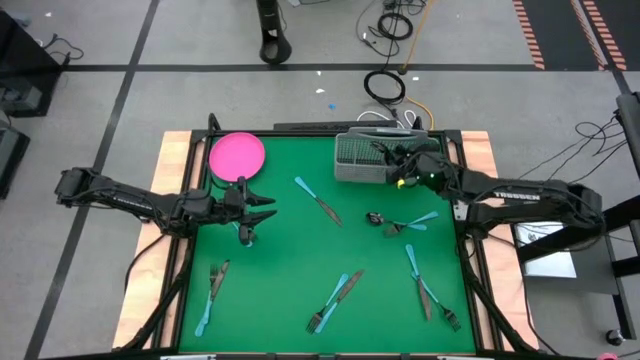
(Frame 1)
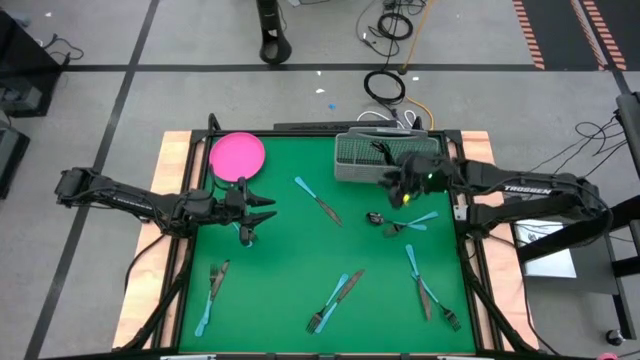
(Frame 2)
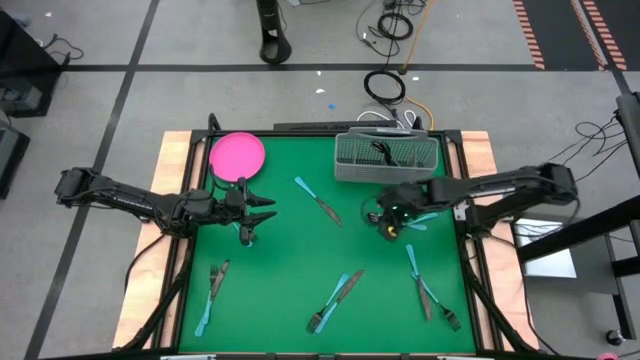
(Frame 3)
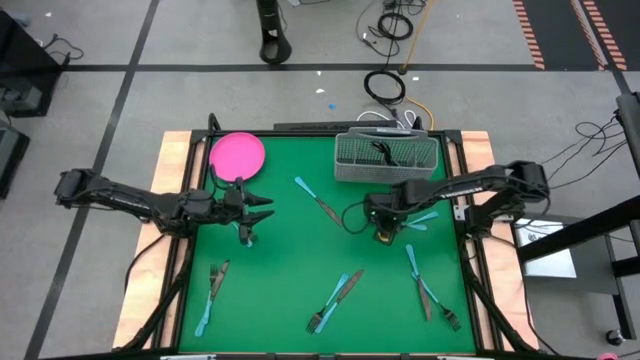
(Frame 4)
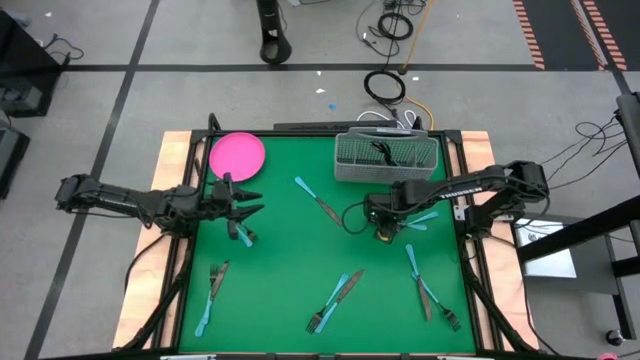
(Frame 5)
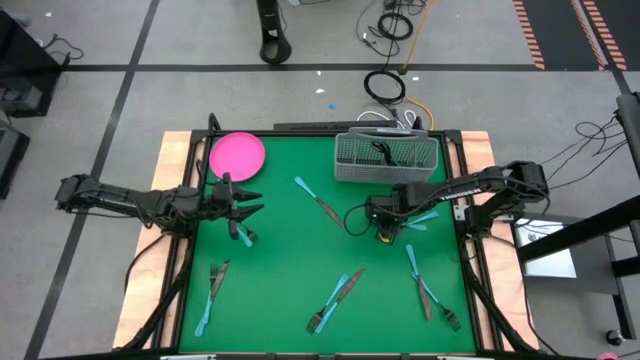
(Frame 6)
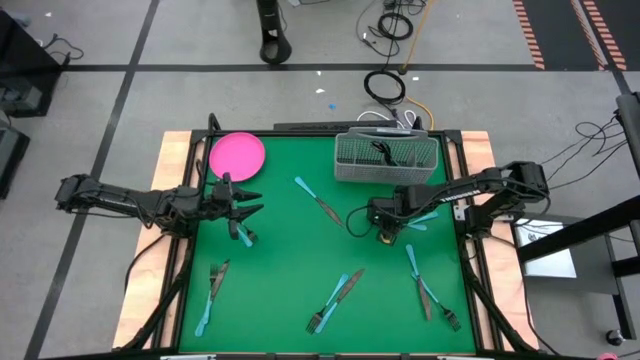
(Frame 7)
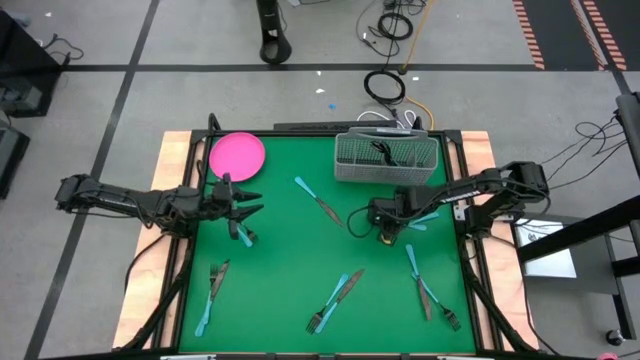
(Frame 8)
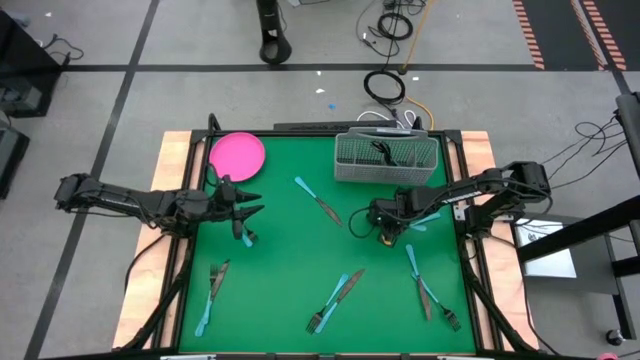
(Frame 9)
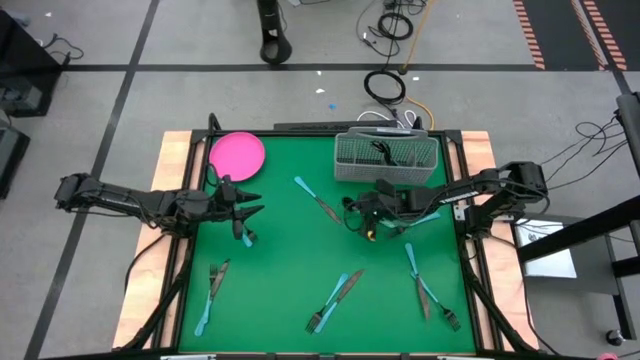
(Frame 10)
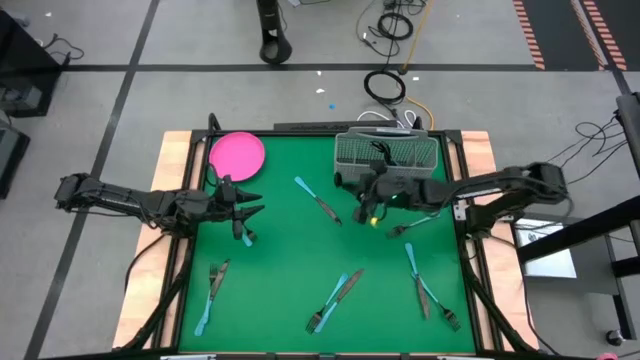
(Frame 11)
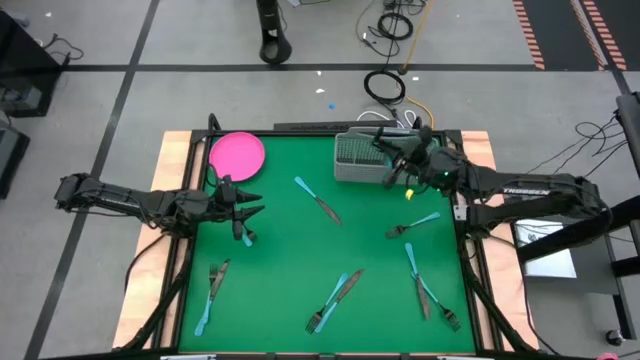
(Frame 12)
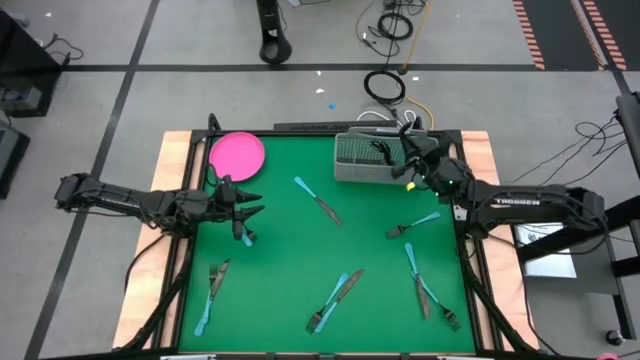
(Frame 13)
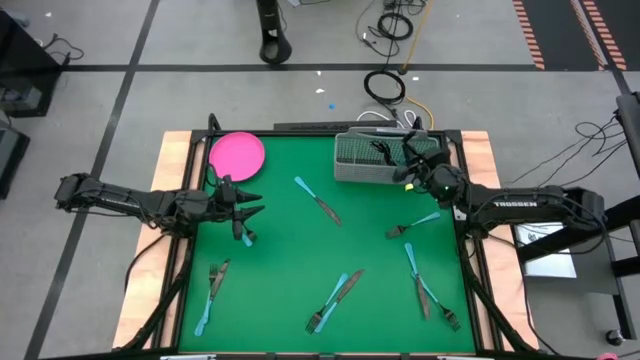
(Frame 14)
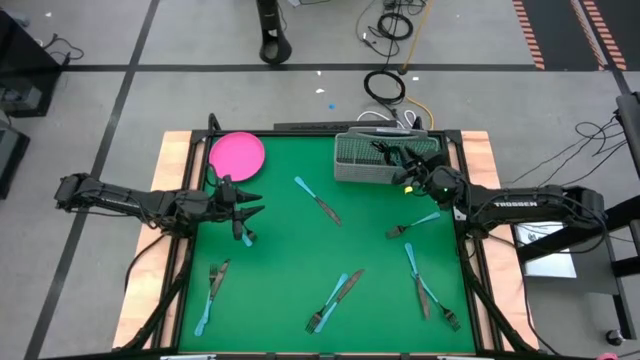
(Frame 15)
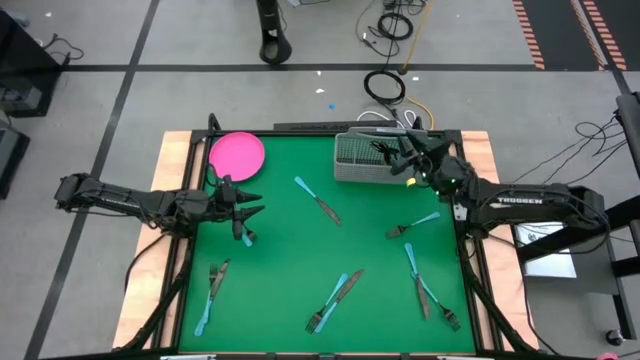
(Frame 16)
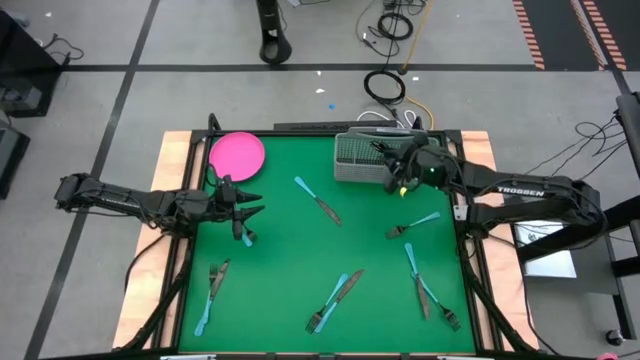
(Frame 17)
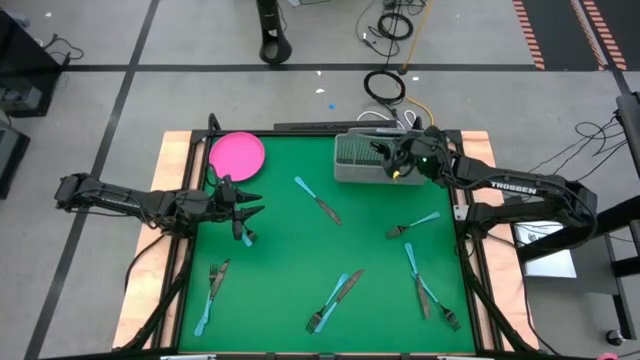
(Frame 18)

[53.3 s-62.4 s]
Task: Sort silverware
Put the black spoon into the cutlery rack with the other black spoons

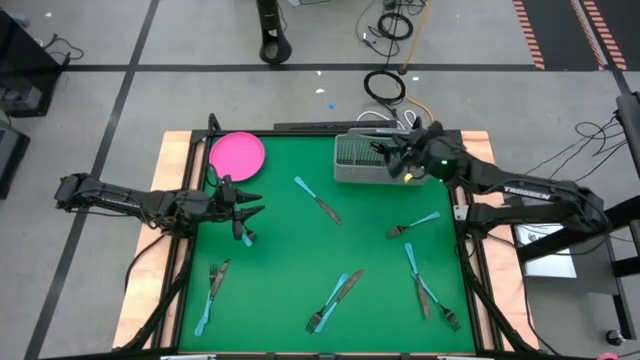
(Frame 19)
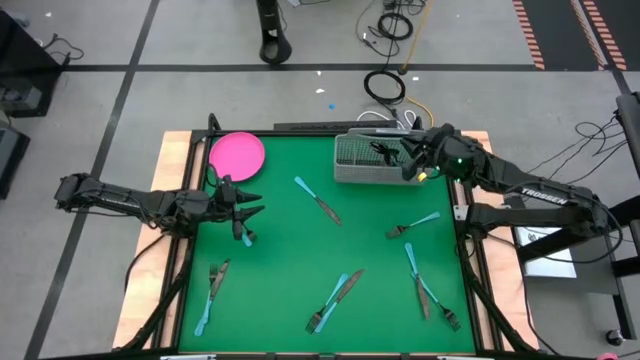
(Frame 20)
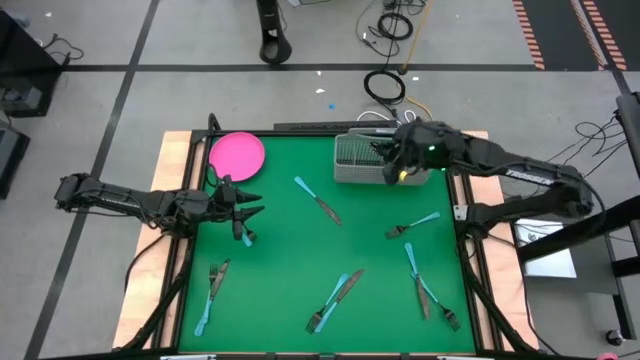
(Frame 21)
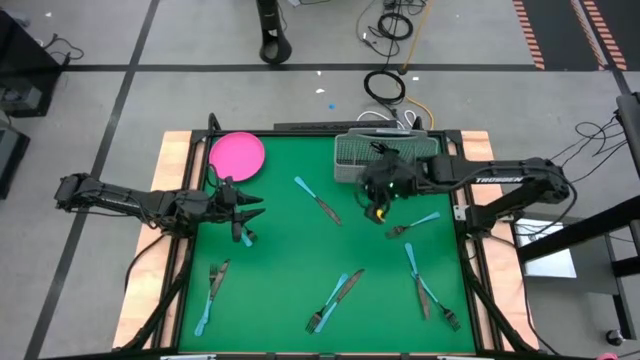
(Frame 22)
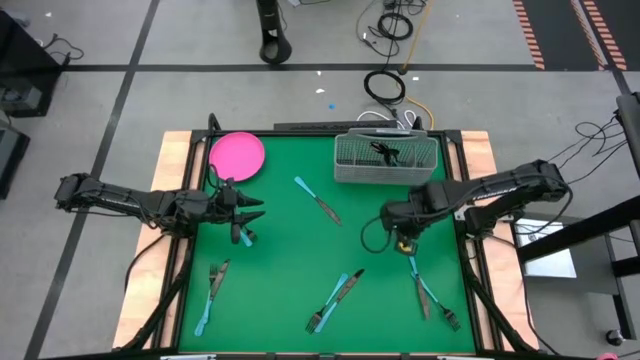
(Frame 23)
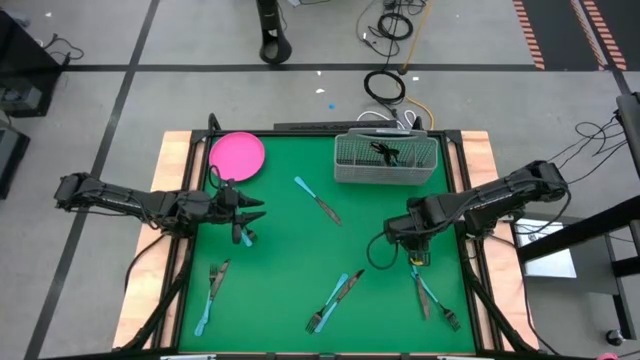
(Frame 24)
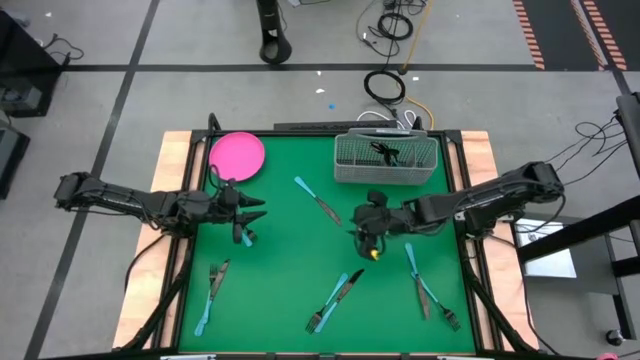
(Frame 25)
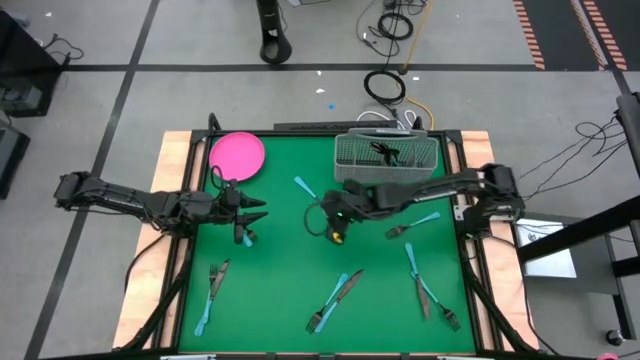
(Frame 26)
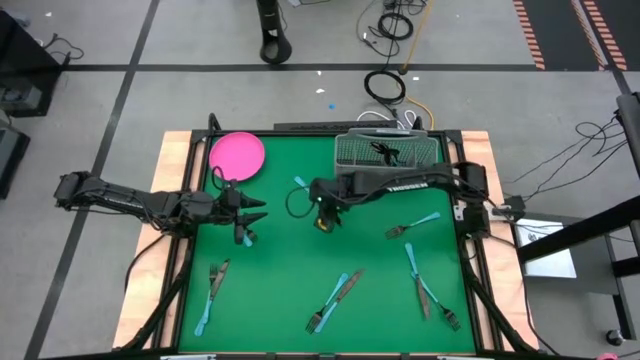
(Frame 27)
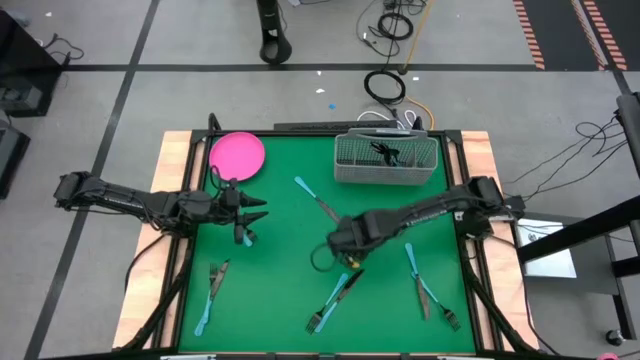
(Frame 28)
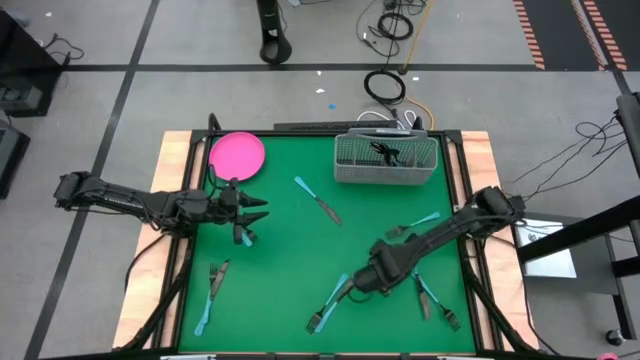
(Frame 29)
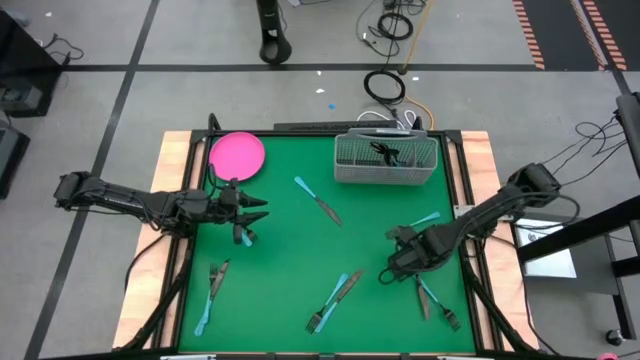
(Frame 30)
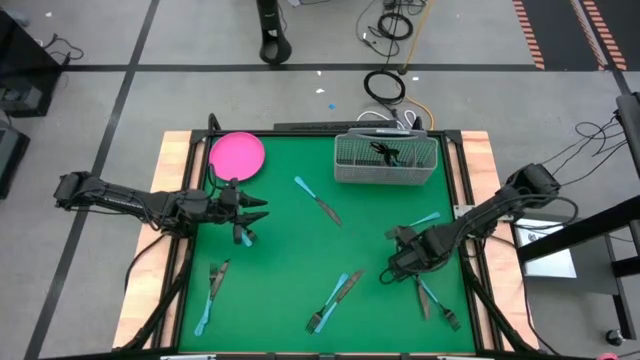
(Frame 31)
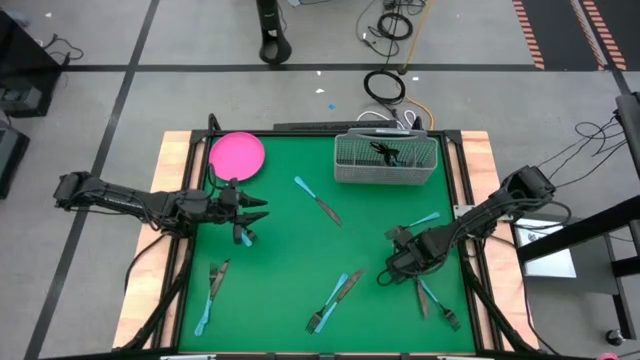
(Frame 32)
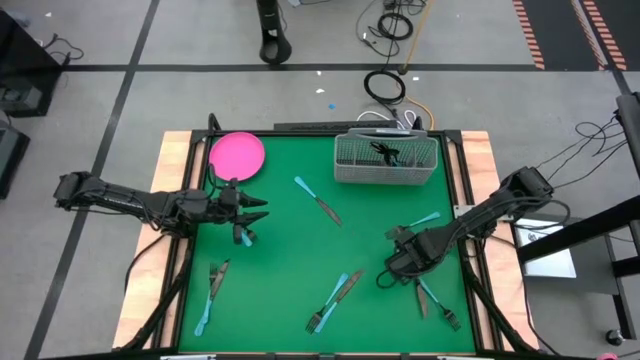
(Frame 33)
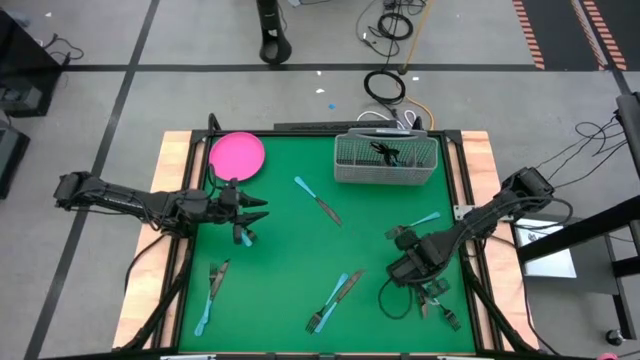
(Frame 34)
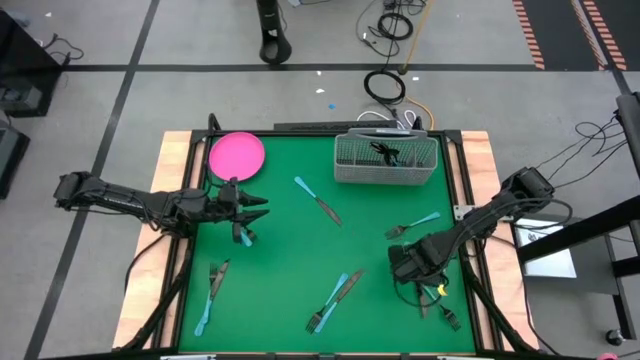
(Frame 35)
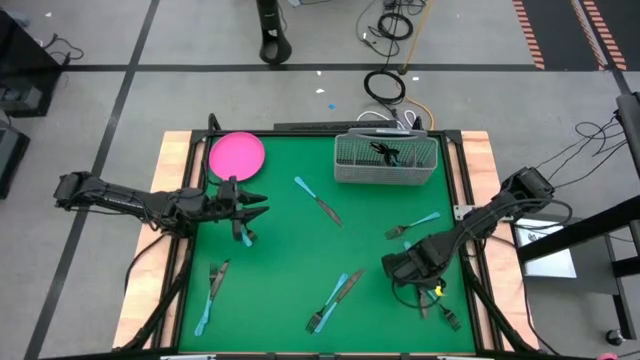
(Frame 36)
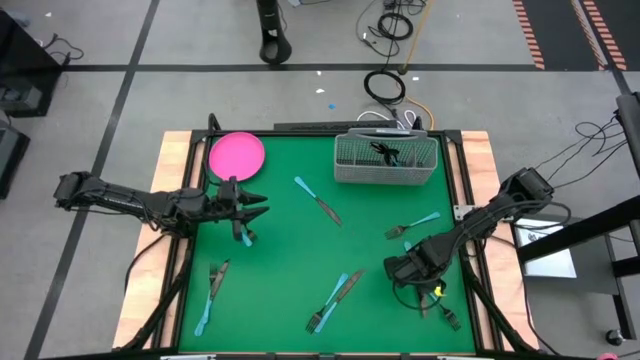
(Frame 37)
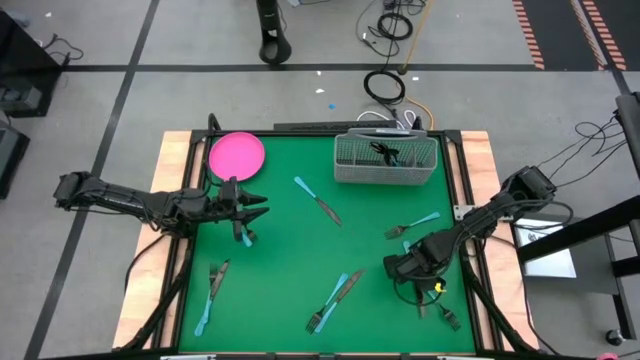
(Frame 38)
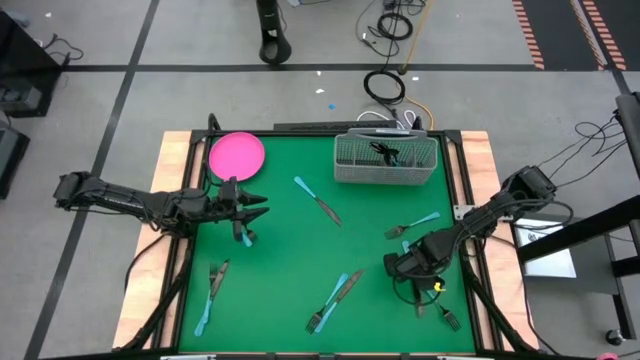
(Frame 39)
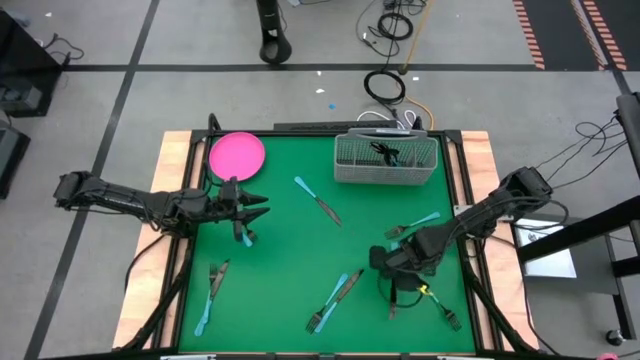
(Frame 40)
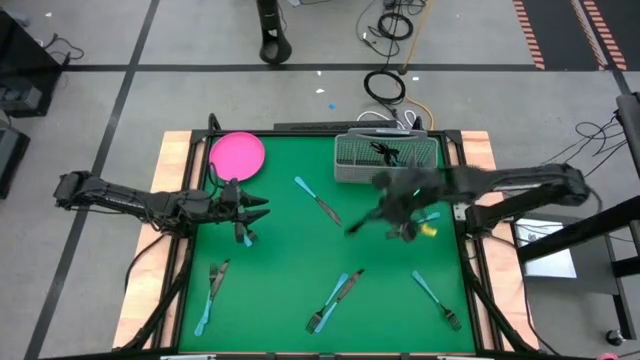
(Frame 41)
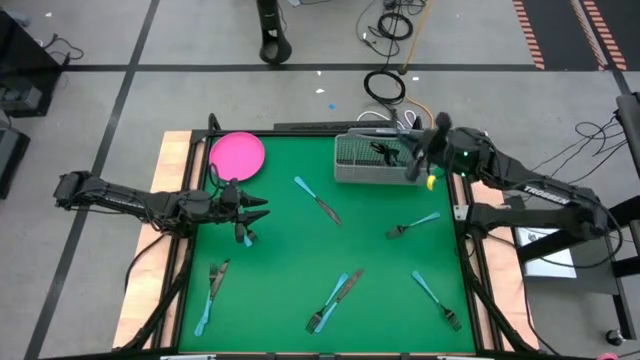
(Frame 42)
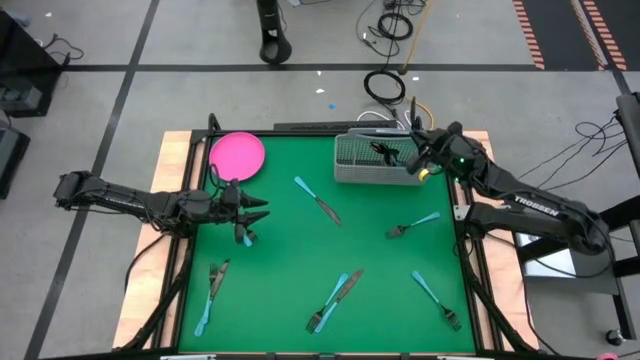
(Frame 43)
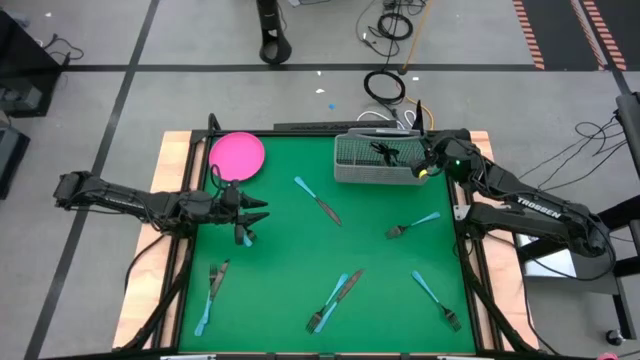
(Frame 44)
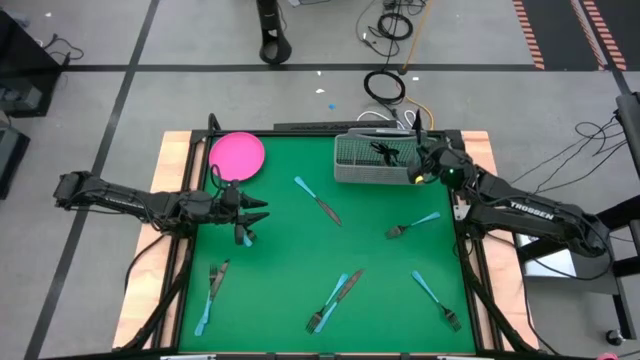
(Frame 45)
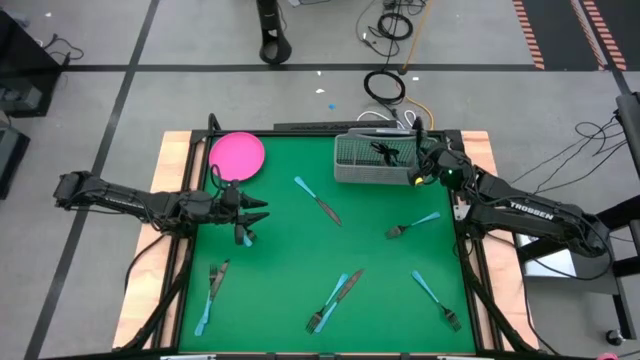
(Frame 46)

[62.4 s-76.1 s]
Put the bottom right black knife into the cutlery rack
